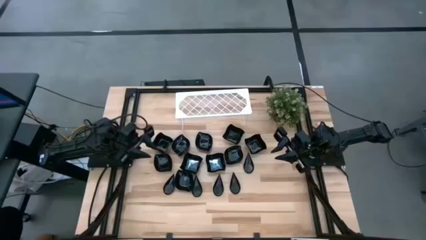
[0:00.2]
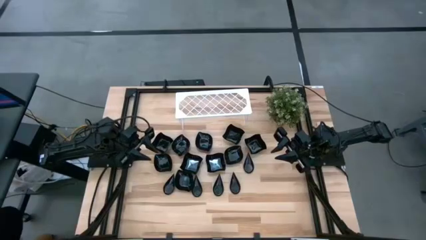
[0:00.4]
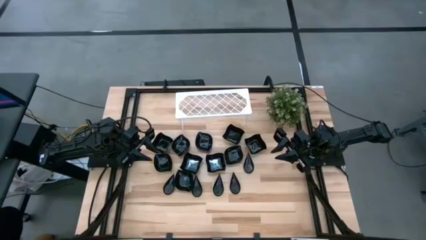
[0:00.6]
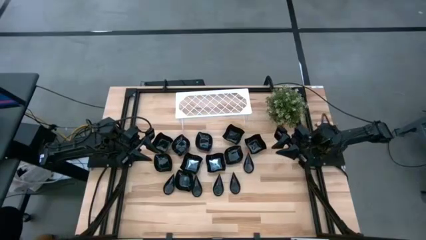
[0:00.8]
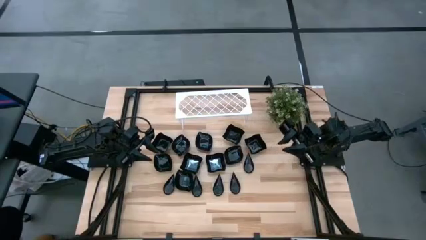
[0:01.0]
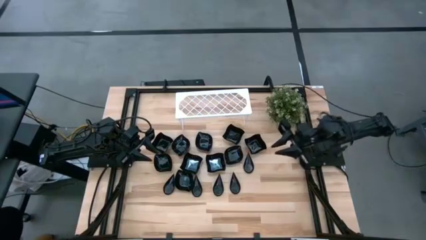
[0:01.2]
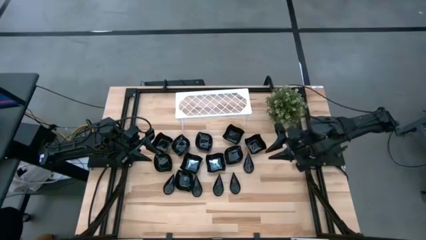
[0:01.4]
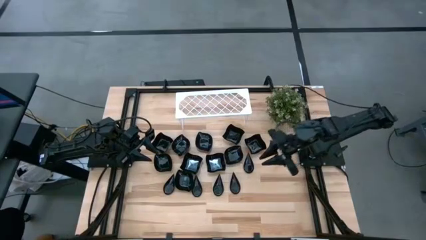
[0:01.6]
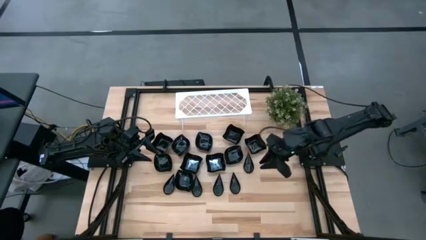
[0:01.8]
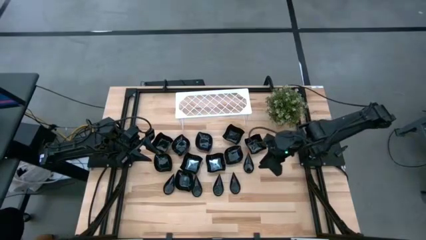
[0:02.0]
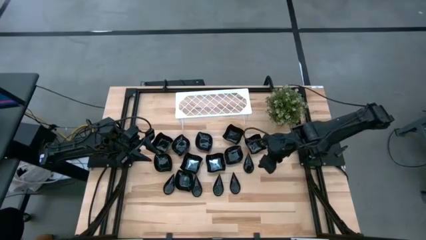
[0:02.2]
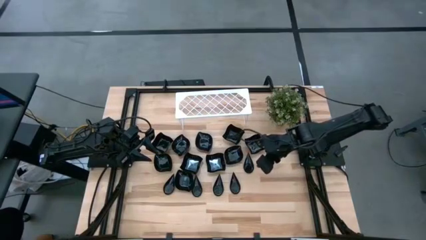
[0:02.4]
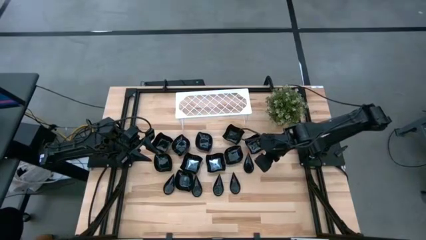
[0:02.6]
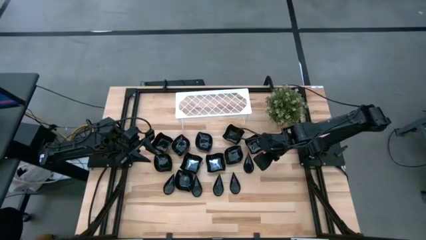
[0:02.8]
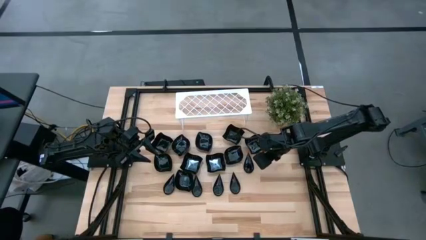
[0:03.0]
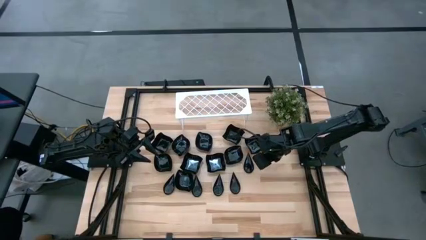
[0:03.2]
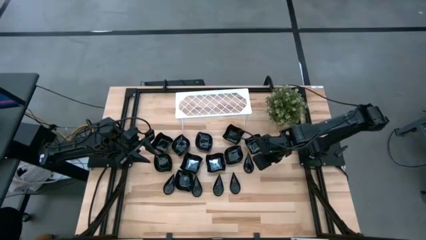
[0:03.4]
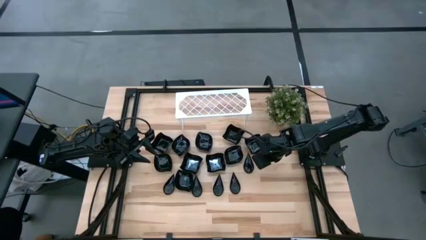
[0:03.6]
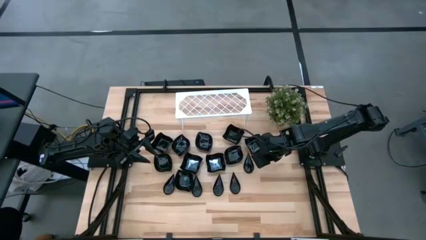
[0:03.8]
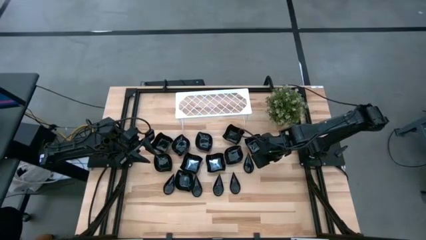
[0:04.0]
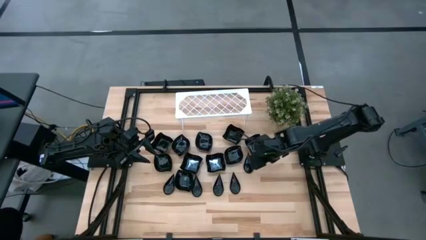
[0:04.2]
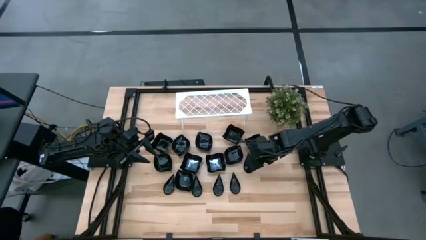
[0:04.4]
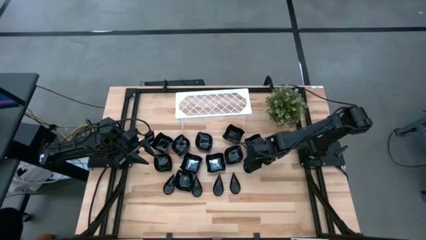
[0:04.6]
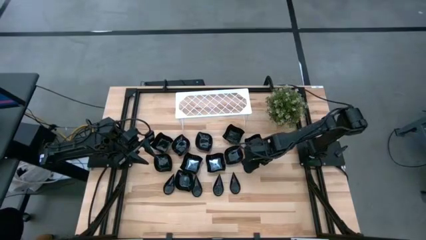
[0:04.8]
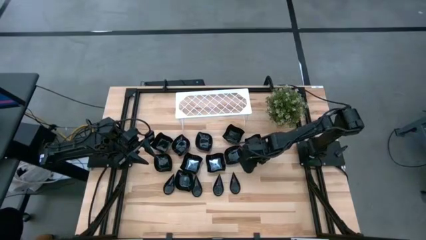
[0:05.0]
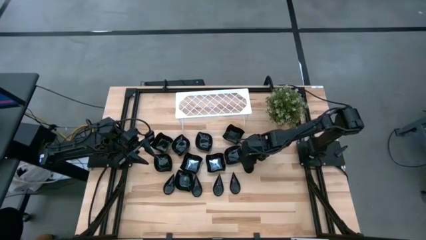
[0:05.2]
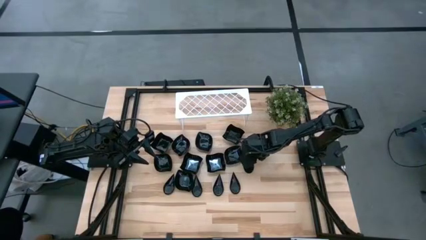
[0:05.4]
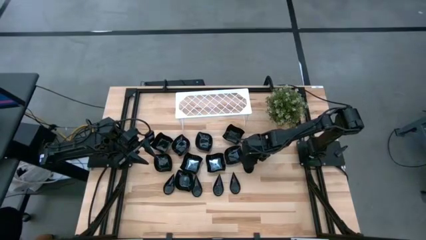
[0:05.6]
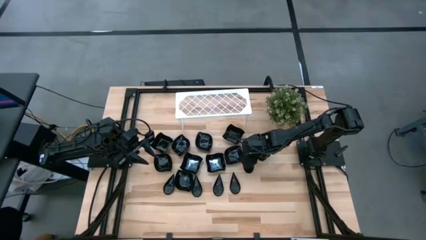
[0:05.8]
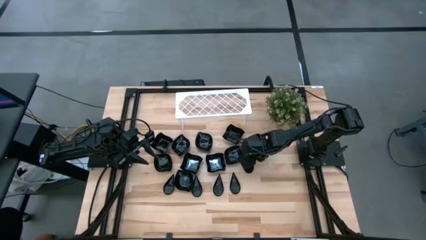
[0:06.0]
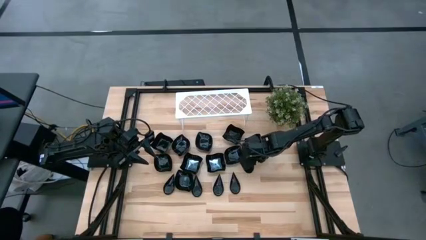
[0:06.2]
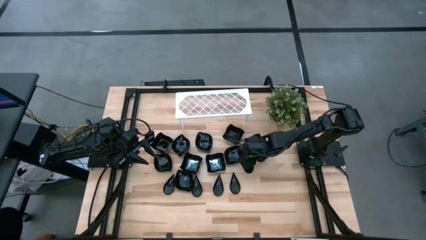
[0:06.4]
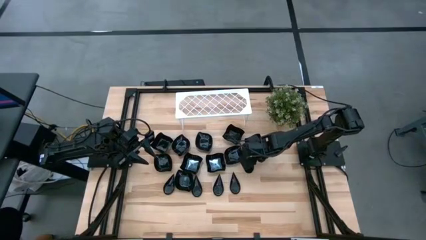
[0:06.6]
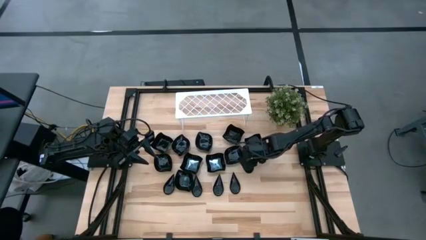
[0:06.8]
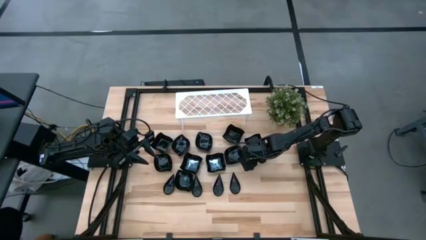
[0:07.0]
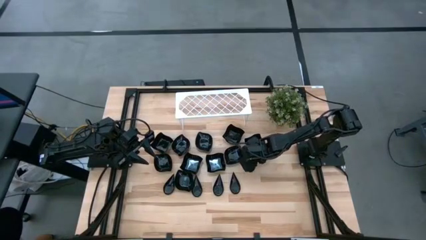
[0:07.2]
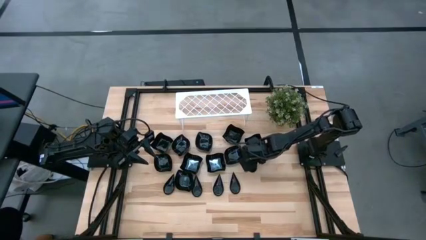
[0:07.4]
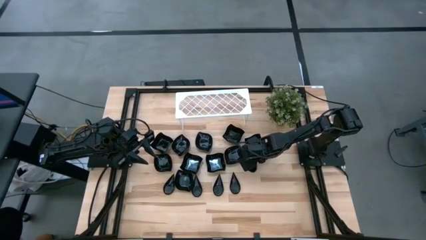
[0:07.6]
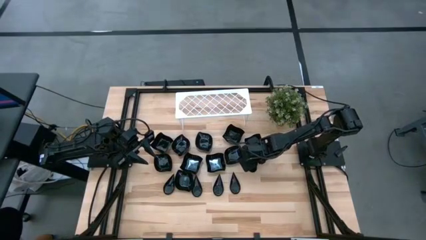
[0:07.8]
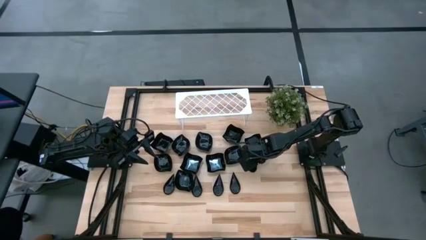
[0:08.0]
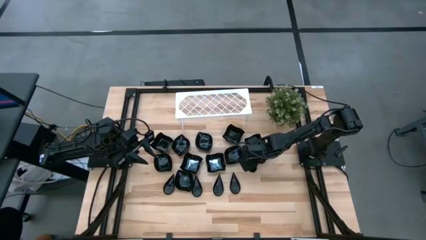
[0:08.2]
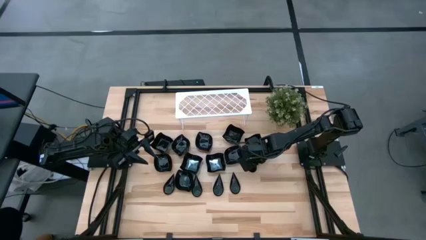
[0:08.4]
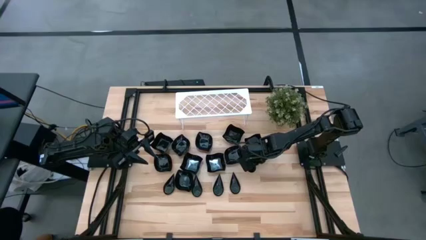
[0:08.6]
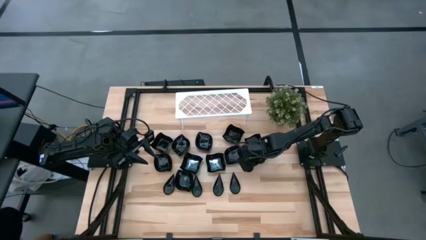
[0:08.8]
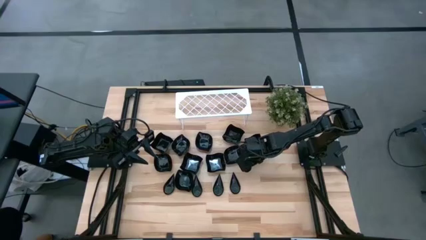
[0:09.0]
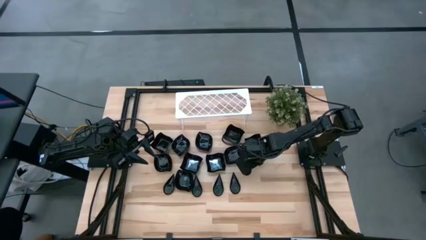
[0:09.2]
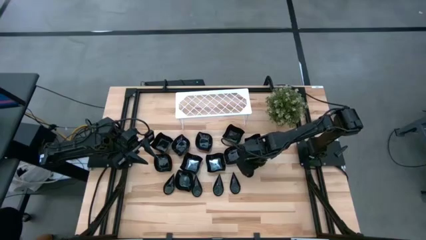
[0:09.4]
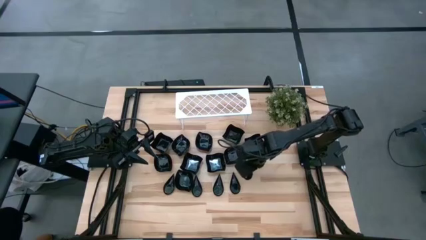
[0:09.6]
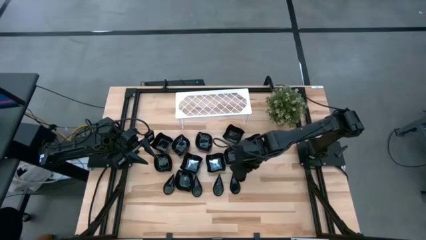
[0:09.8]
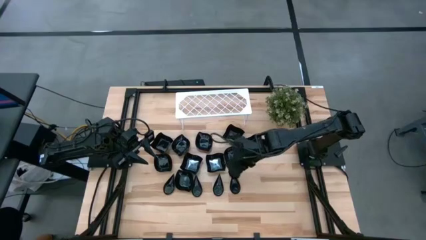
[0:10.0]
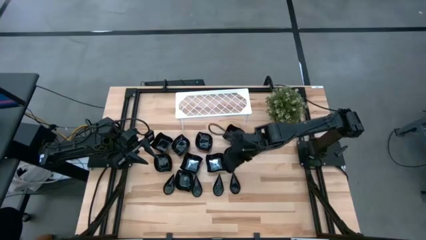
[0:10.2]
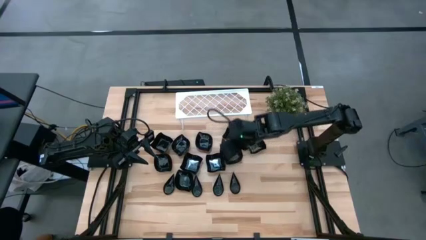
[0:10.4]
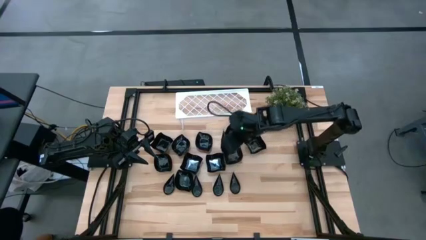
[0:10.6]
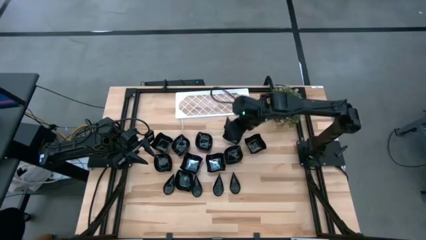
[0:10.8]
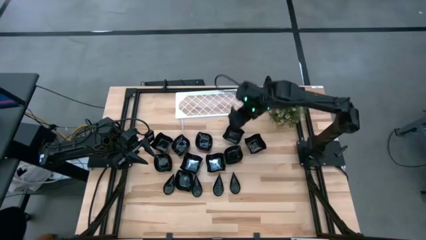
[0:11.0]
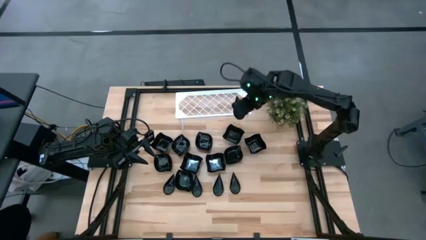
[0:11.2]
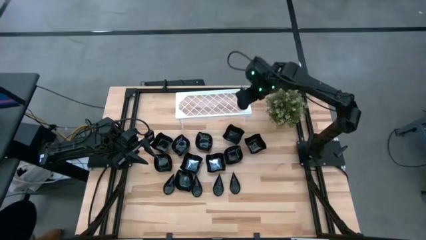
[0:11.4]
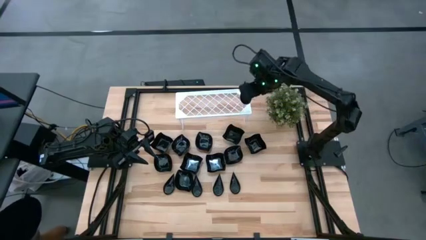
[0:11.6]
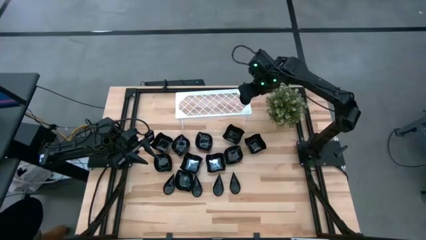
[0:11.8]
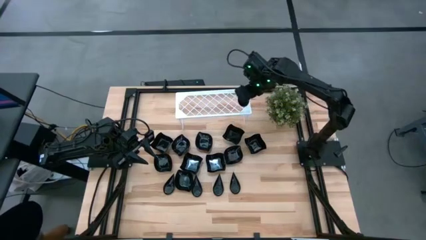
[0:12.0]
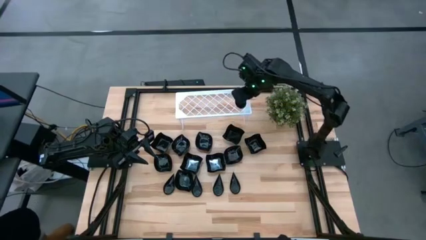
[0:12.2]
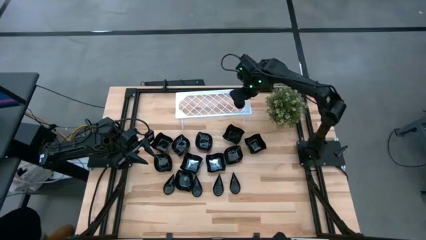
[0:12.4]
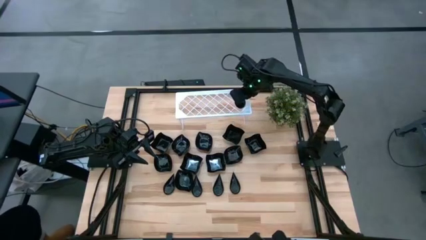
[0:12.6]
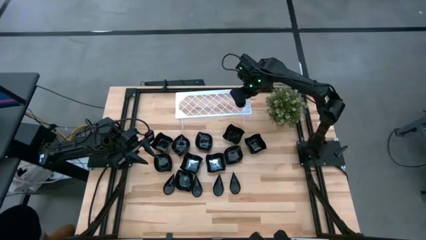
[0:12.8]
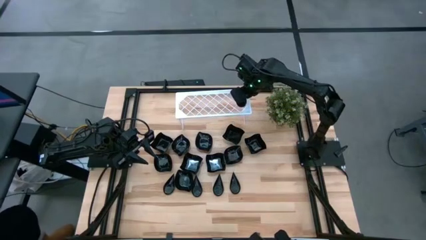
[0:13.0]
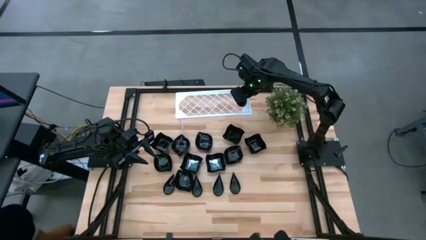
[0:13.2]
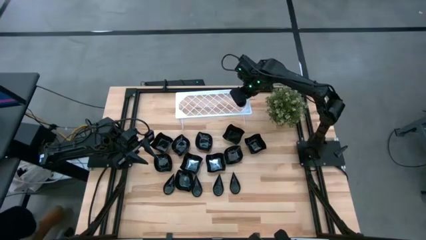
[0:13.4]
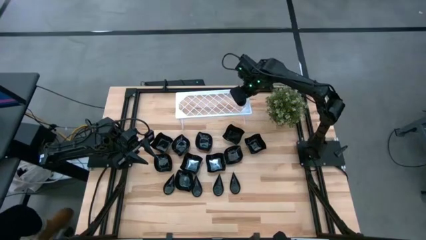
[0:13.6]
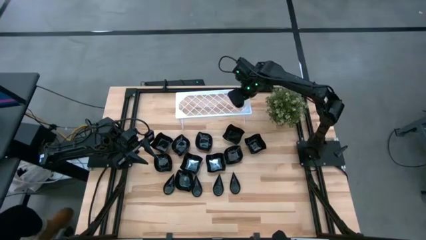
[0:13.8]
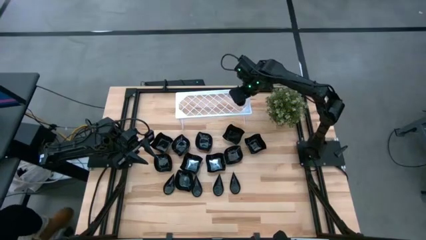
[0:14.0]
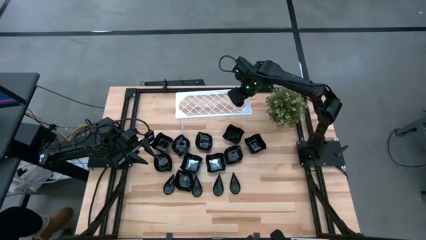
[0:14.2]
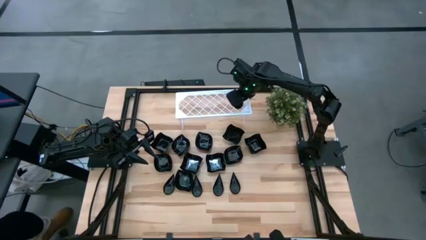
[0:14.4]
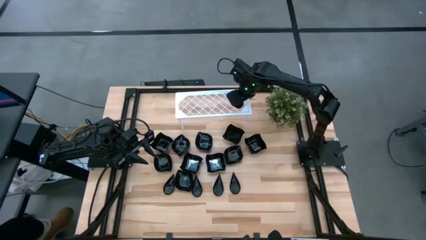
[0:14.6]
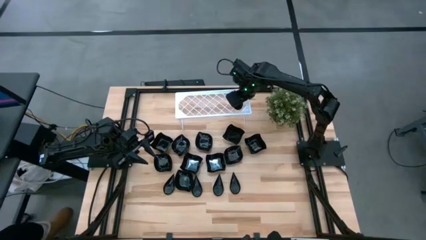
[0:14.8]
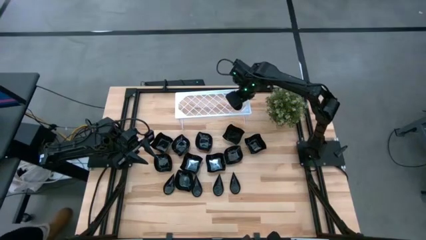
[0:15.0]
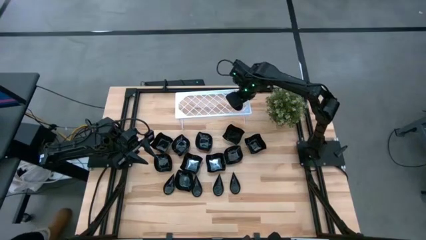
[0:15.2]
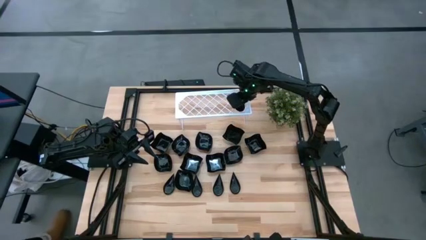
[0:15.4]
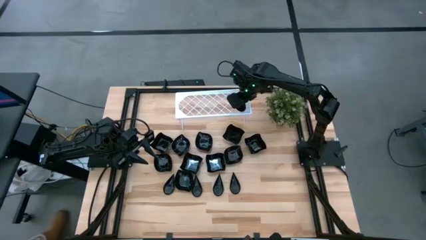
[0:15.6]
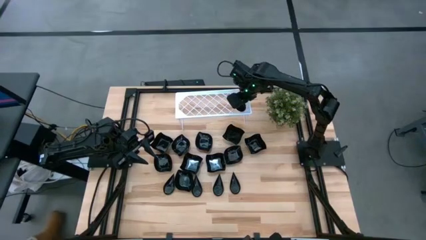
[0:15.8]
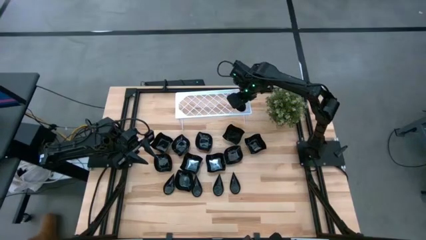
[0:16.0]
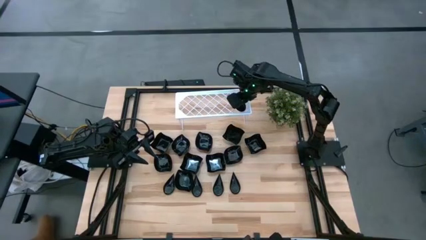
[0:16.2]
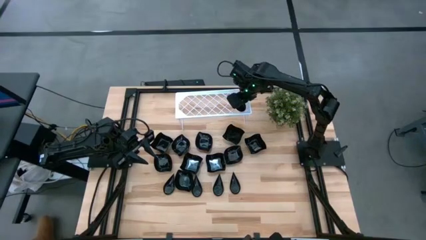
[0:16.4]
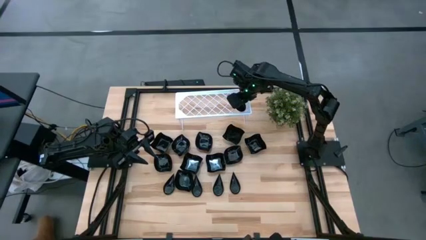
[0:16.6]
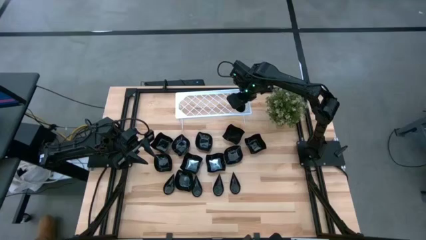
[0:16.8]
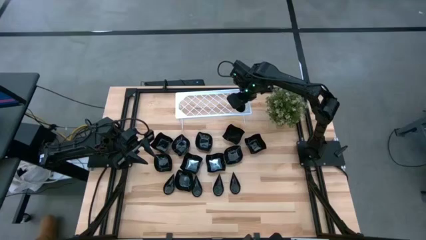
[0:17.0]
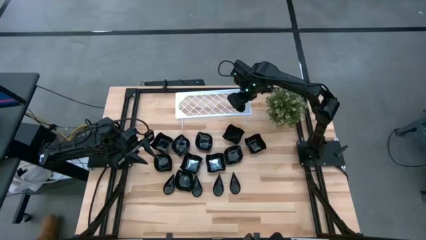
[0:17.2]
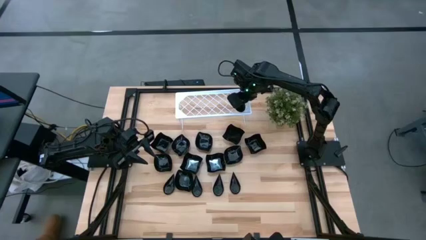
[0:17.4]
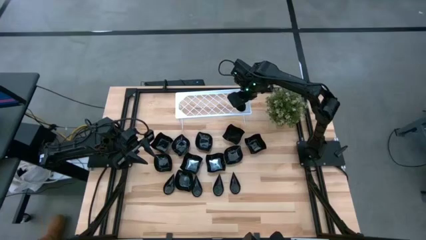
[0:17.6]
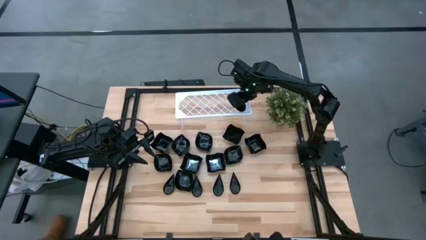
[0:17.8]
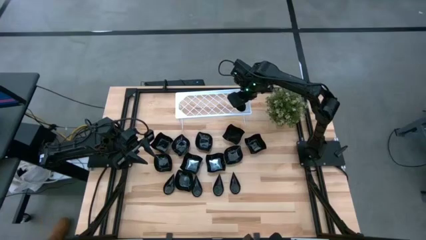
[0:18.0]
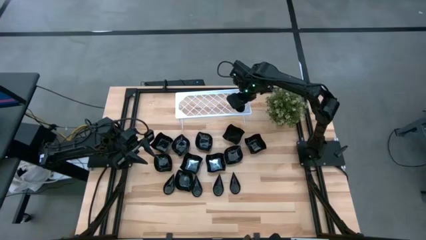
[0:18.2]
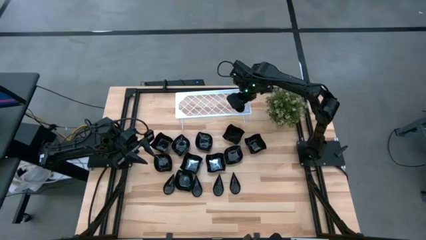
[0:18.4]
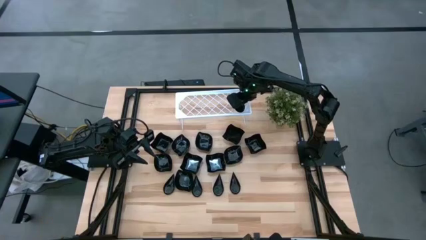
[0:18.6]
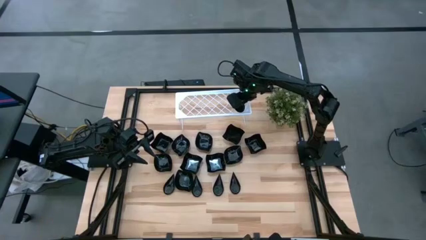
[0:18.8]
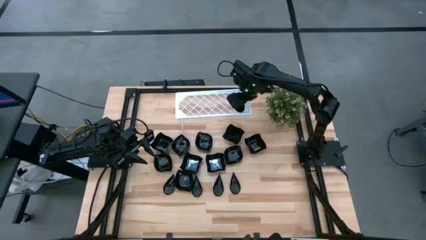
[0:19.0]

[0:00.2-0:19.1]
Task: Pick & Place Mini shaped plates
Put the drop-shaped plate on the shelf
